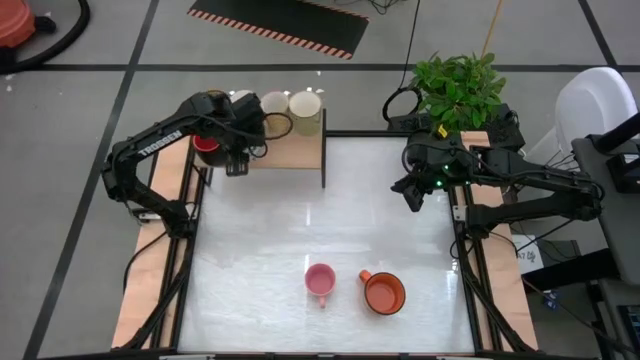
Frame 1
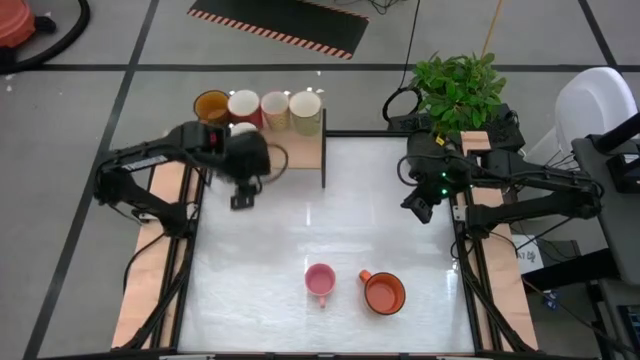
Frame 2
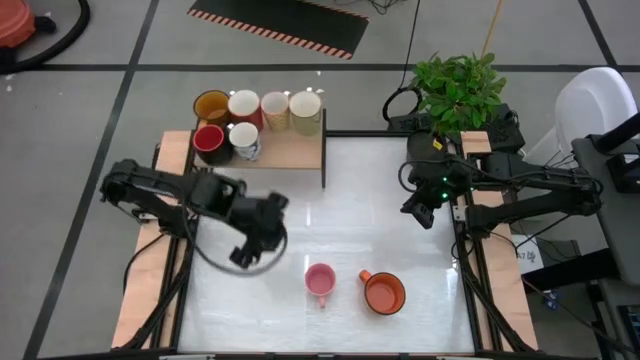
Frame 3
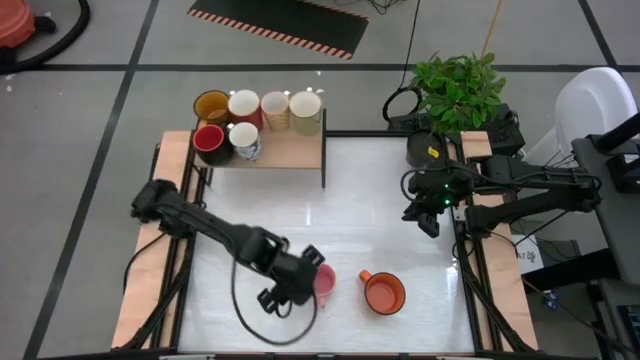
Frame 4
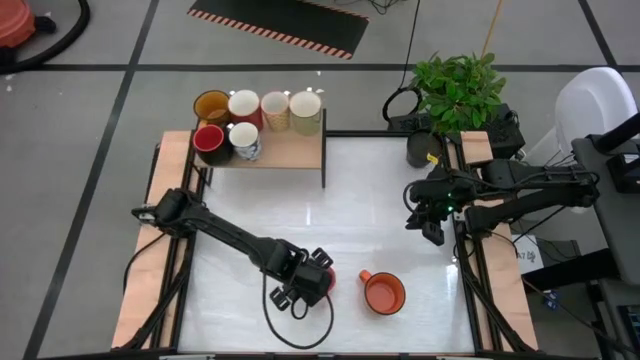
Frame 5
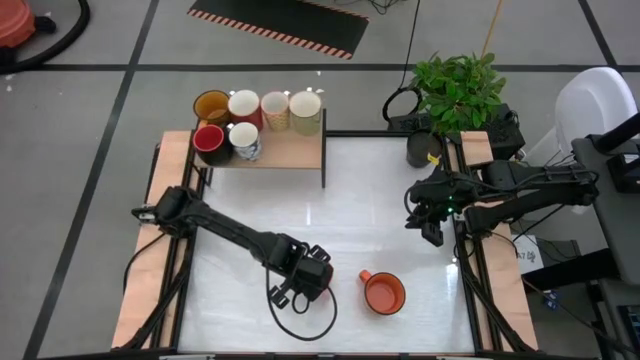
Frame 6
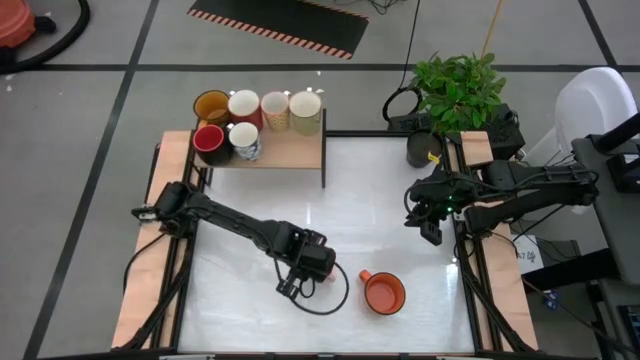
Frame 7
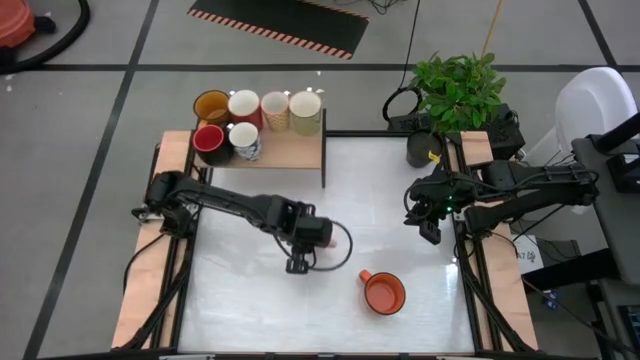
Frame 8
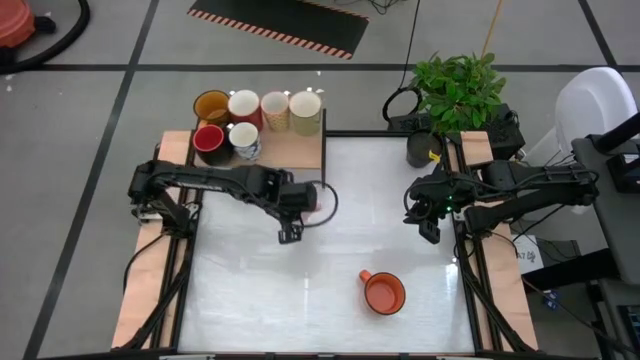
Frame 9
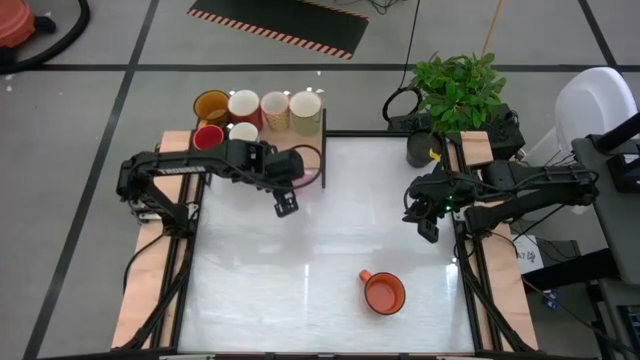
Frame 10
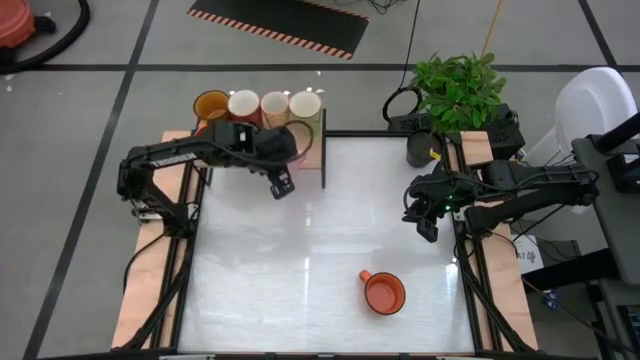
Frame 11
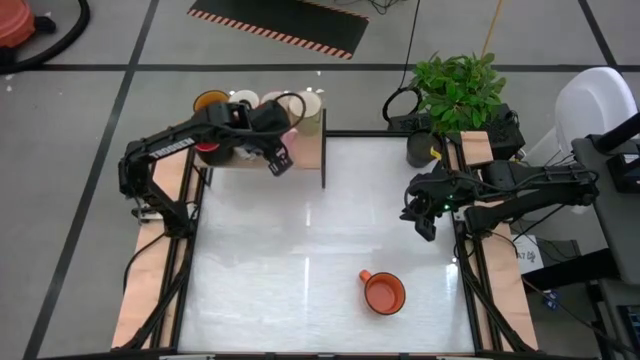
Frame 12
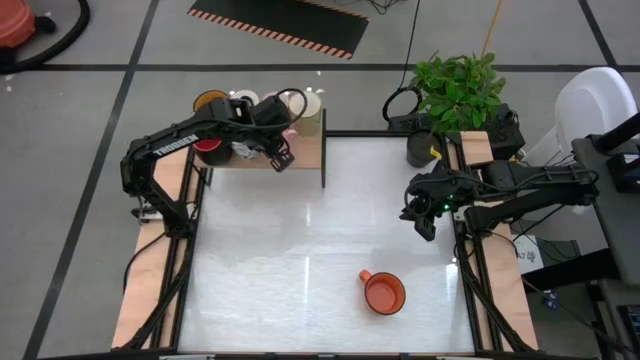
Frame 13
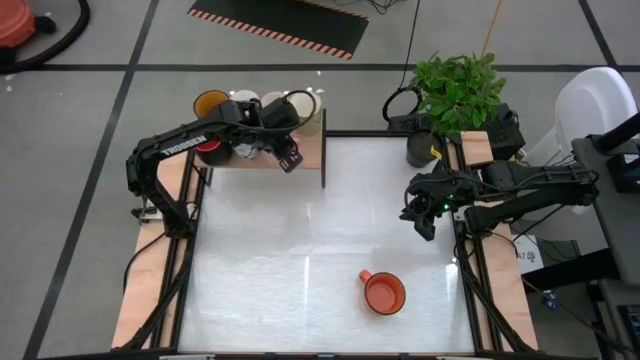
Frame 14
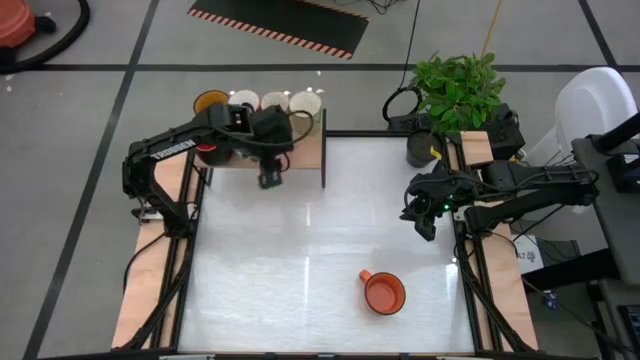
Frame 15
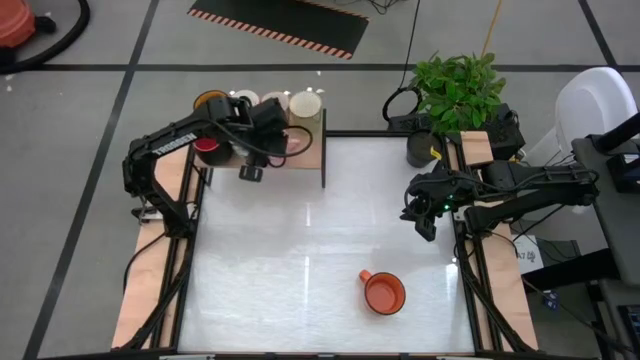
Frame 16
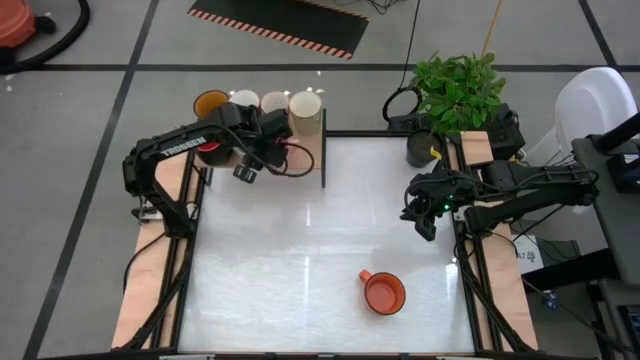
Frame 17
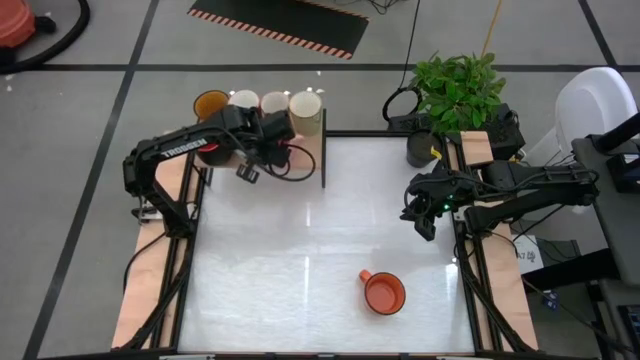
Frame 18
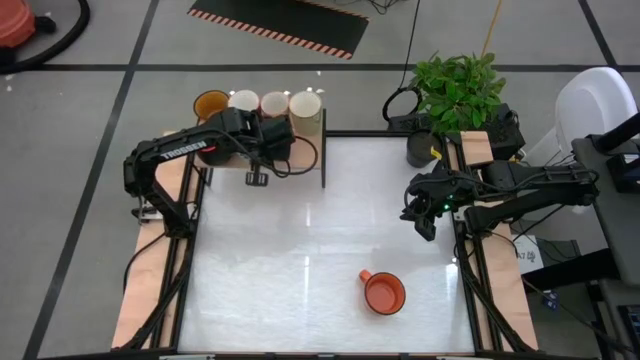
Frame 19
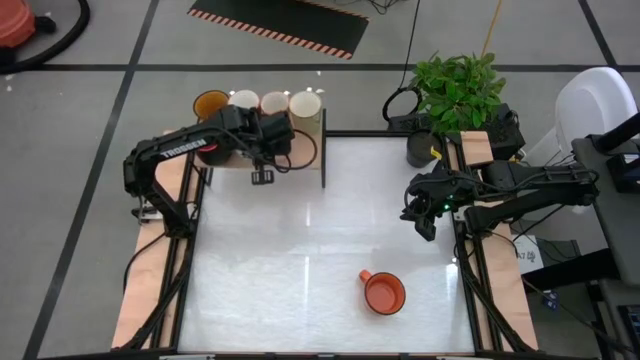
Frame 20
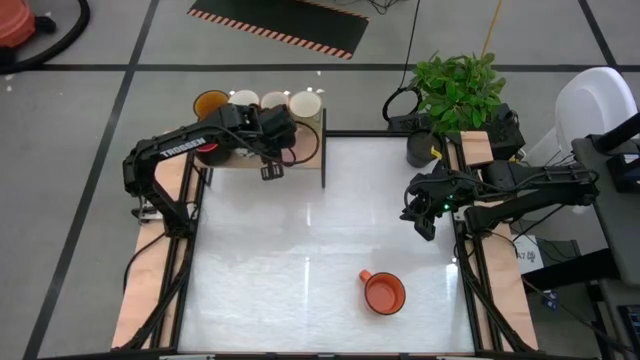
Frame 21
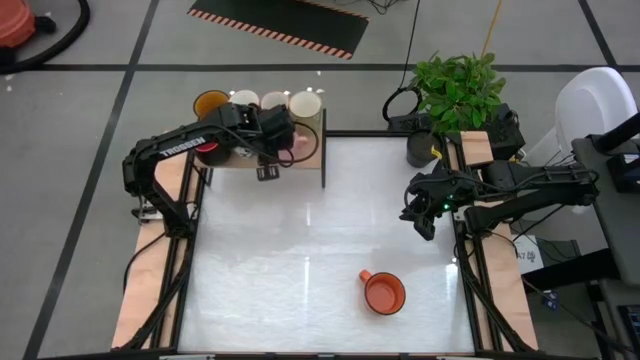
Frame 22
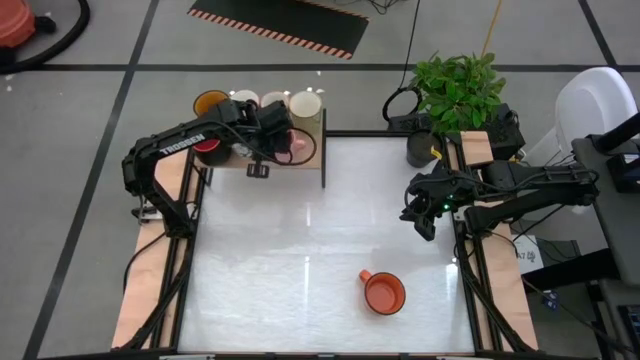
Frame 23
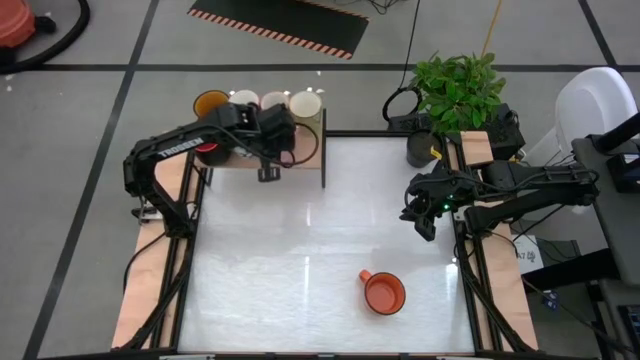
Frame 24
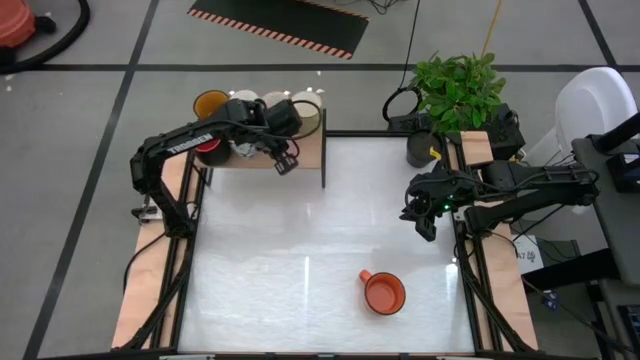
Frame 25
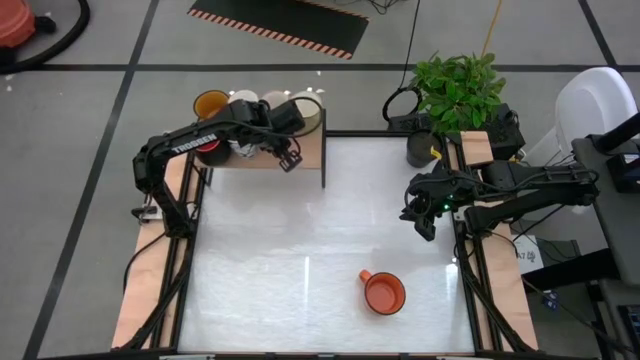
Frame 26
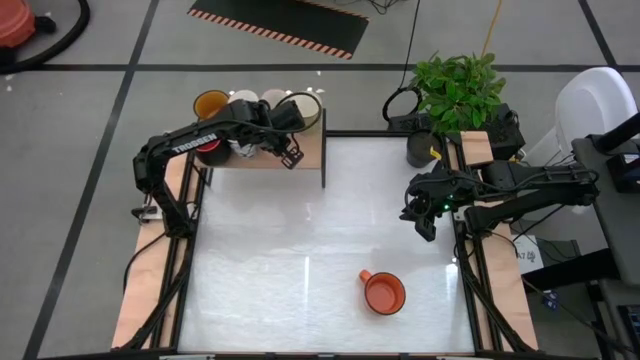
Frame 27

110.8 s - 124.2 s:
Task: Place coffee mugs
Put the pink mug on the shelf

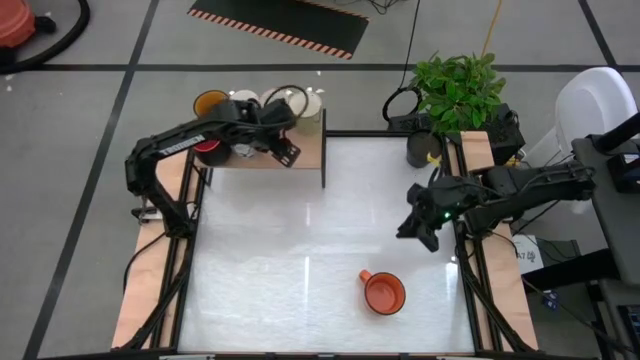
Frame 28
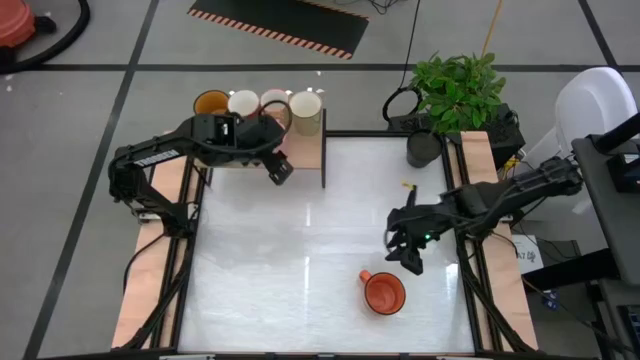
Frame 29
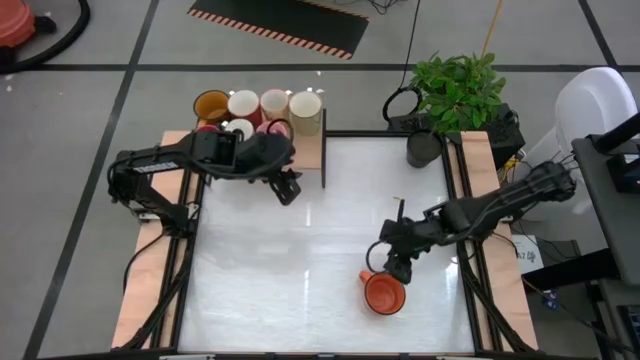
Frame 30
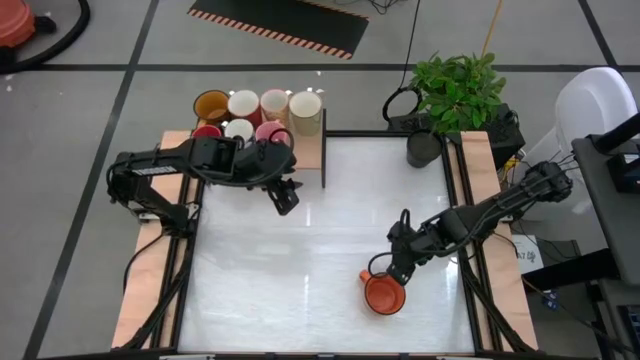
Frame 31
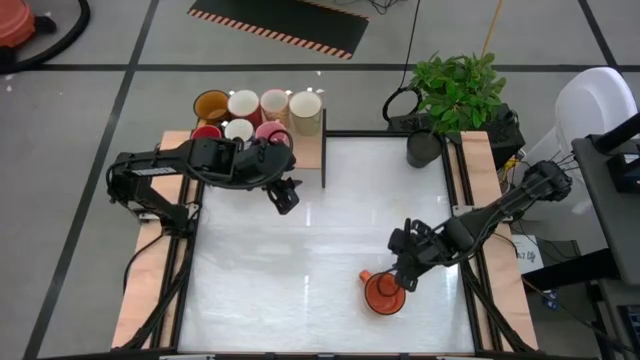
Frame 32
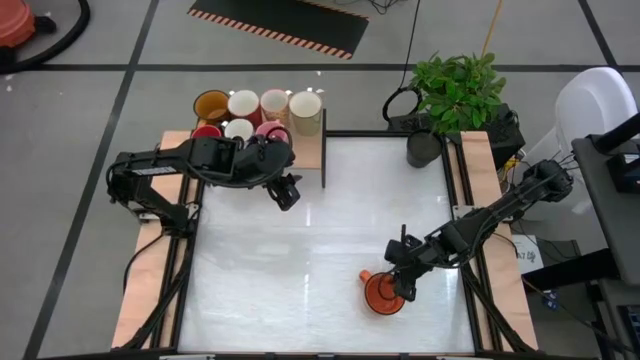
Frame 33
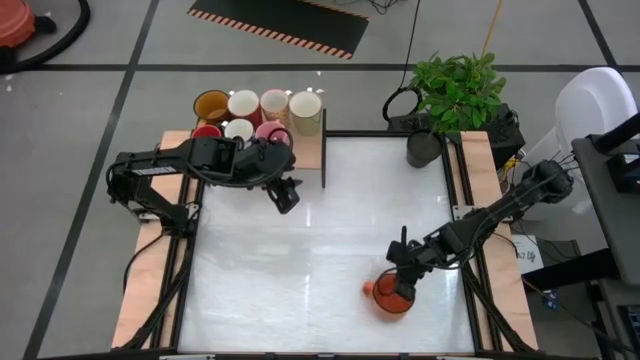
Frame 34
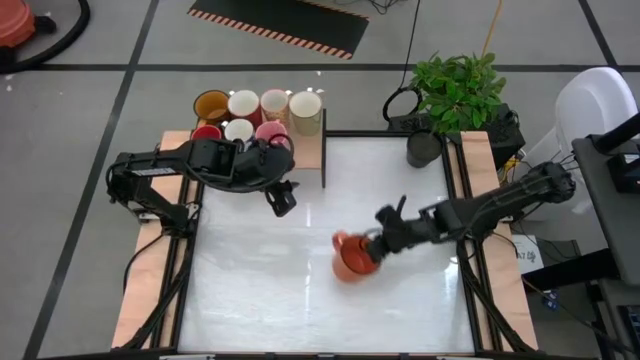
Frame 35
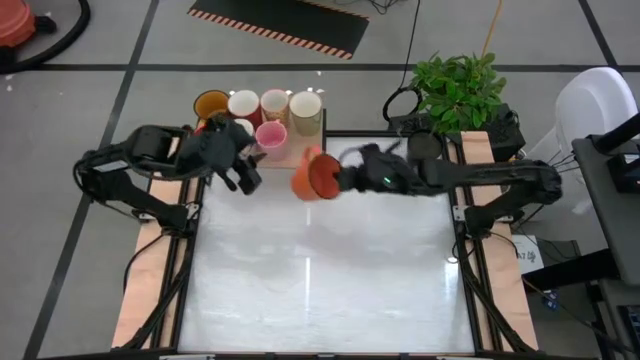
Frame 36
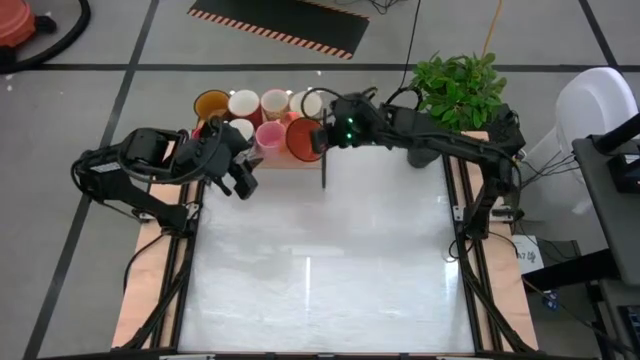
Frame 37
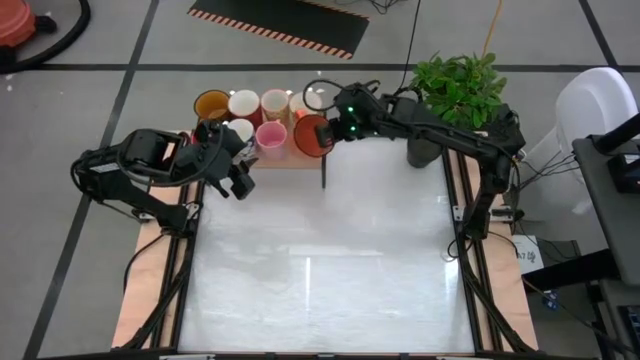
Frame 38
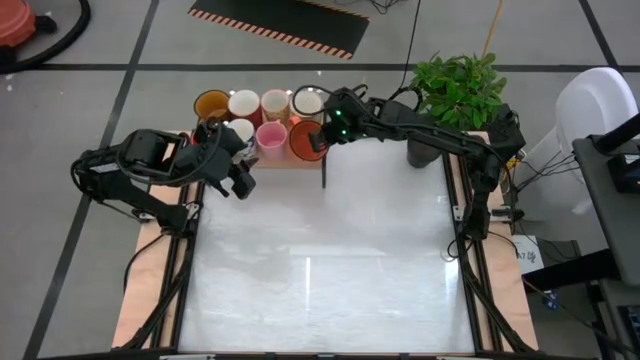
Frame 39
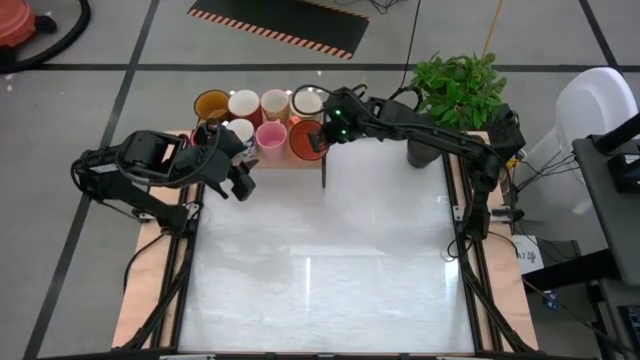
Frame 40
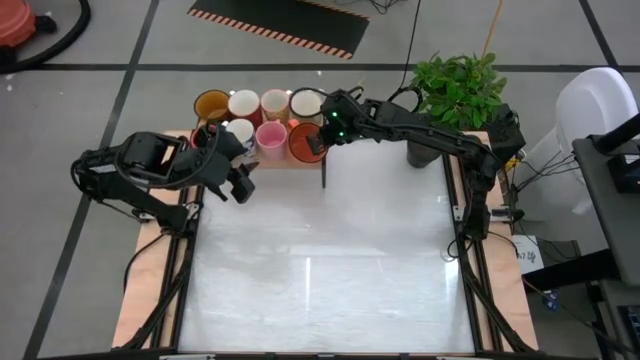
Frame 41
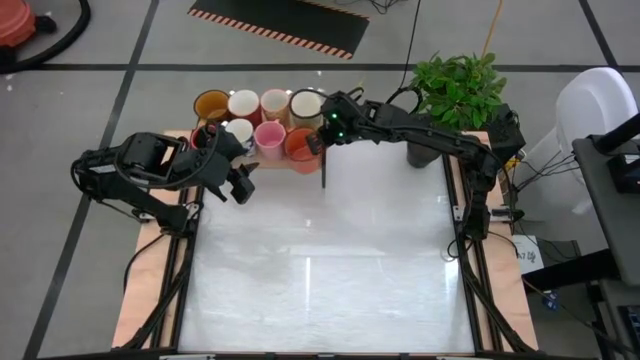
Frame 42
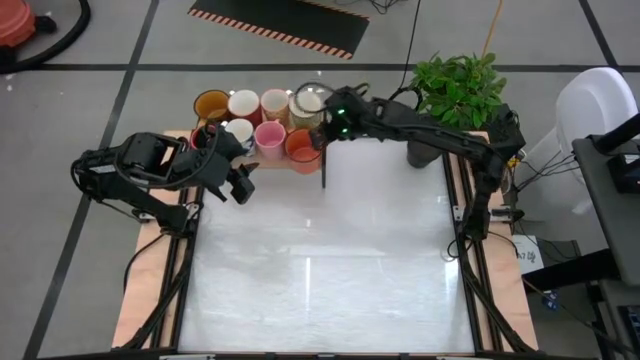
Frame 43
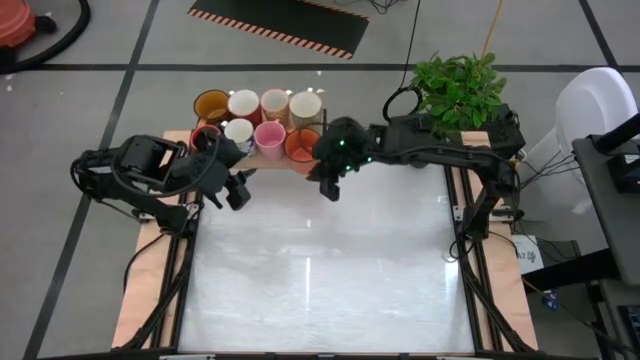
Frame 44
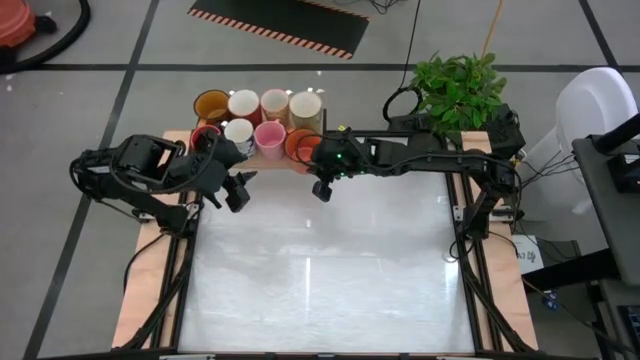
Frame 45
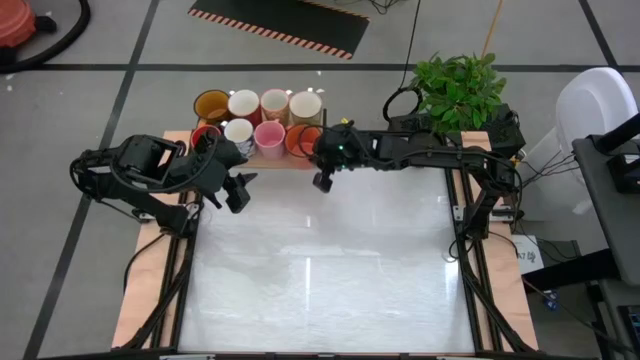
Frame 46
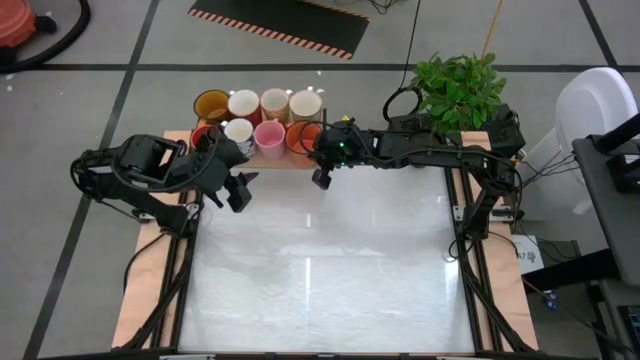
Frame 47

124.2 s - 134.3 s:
Put the orange mug on the shelf
